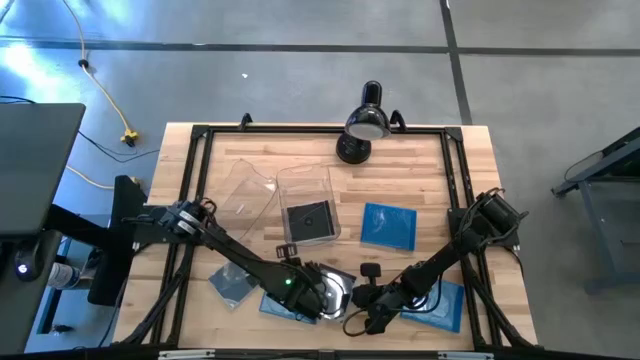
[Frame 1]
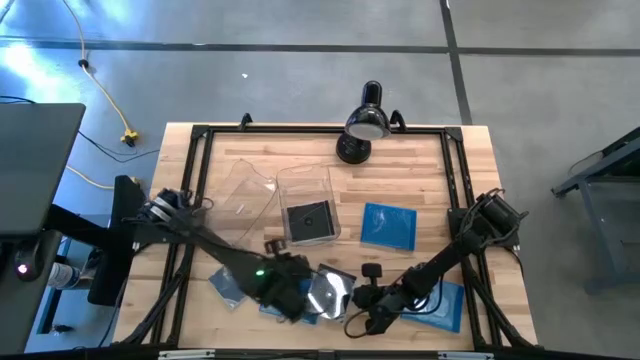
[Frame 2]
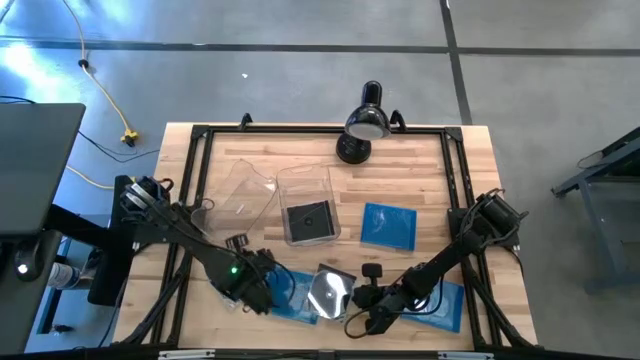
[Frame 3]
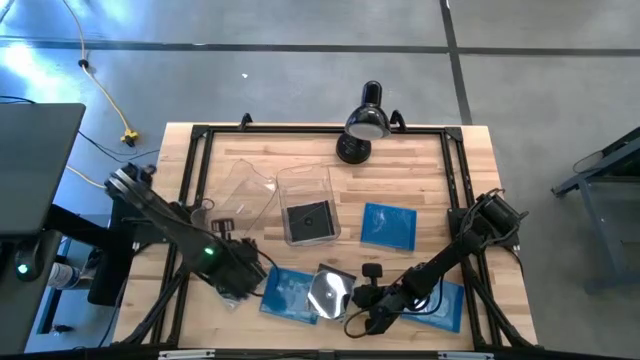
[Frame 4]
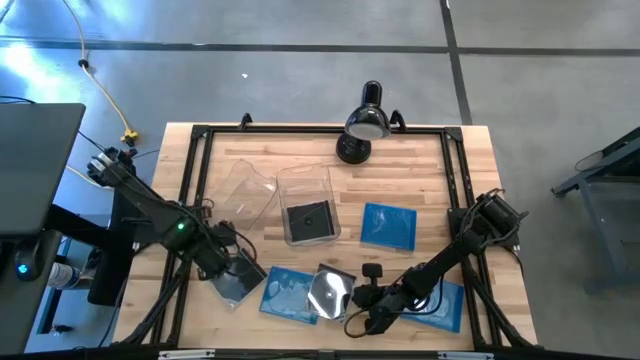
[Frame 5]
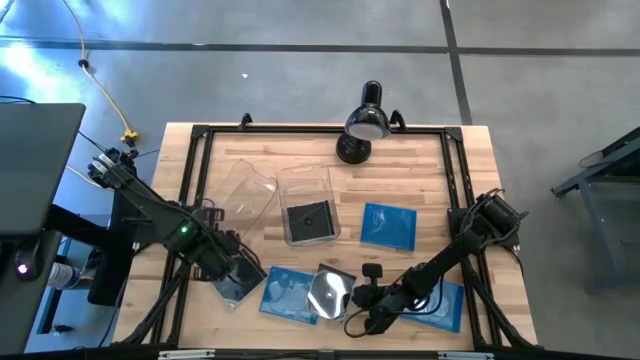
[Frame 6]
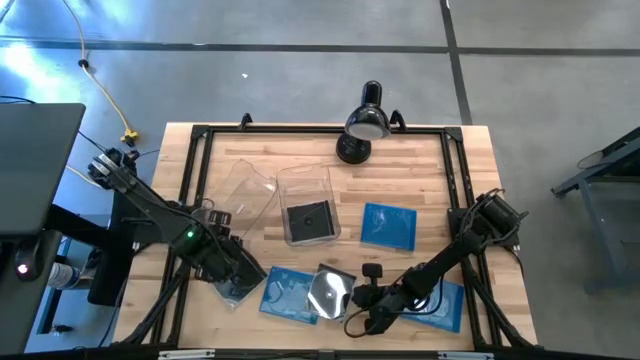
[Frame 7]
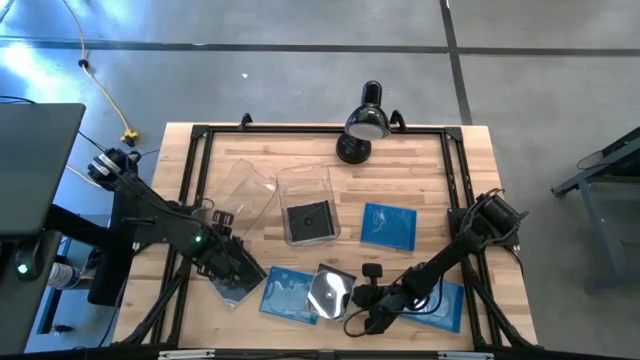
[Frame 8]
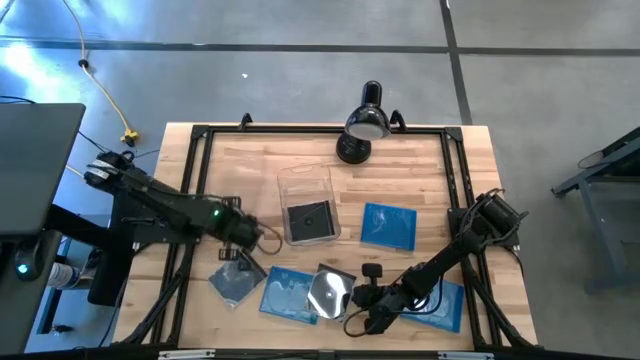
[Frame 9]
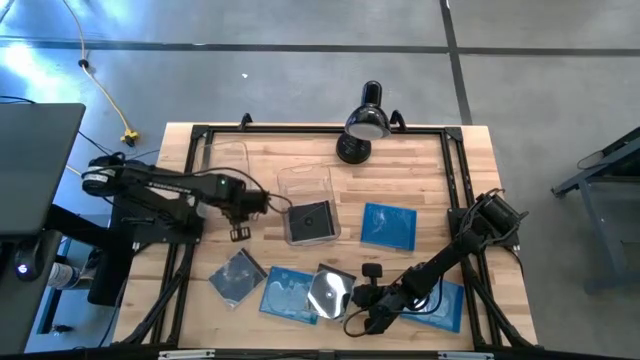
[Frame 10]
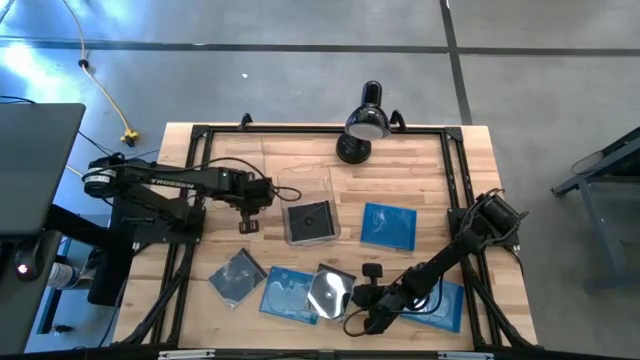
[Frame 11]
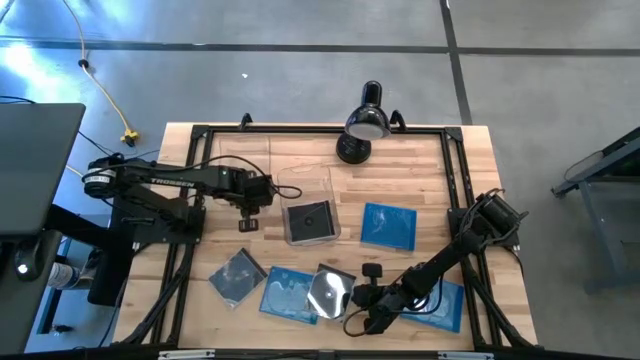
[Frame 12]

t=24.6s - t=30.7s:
Task: Pick & place jewel cases by type
Adjust the left transparent bin

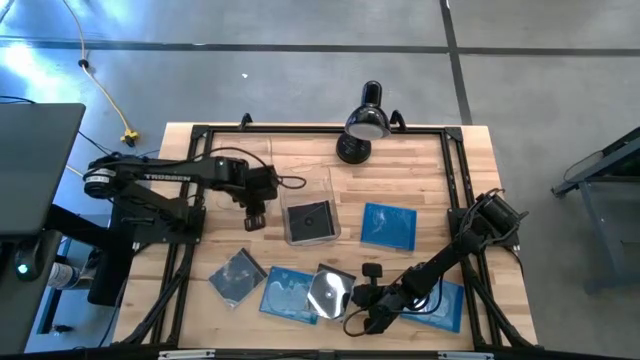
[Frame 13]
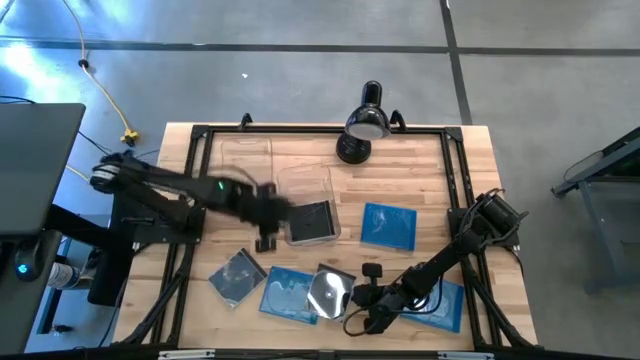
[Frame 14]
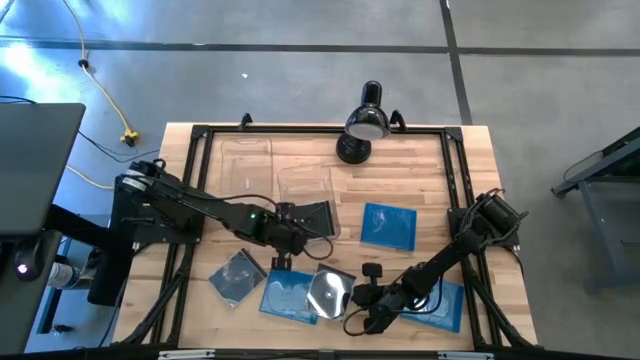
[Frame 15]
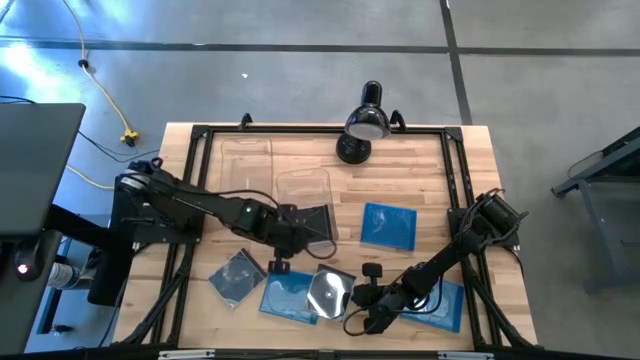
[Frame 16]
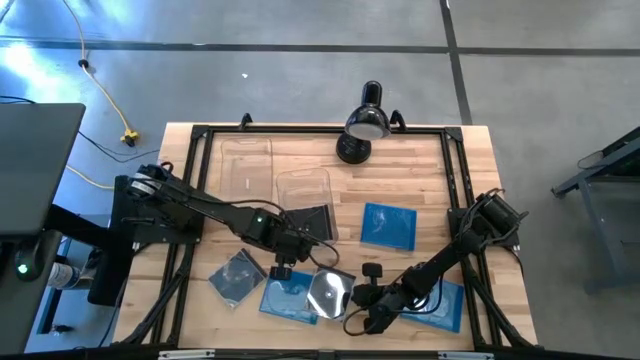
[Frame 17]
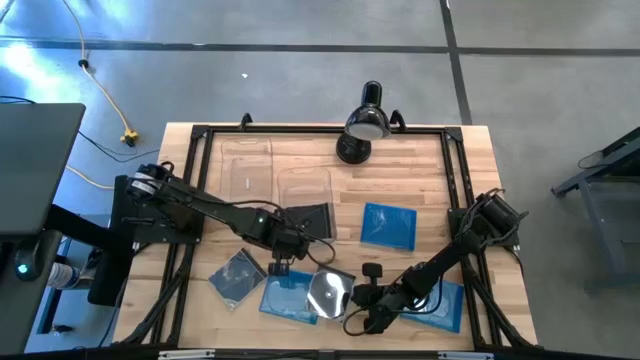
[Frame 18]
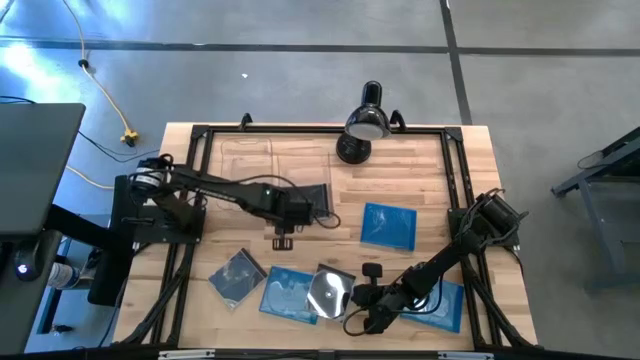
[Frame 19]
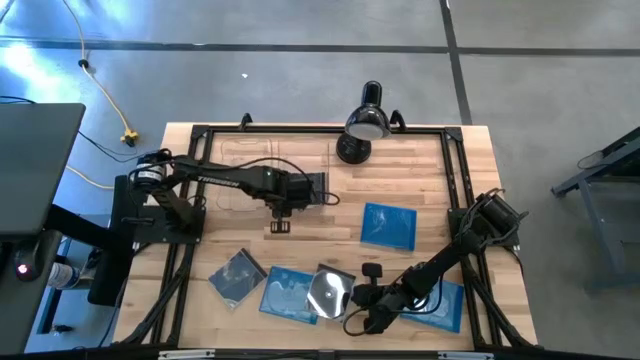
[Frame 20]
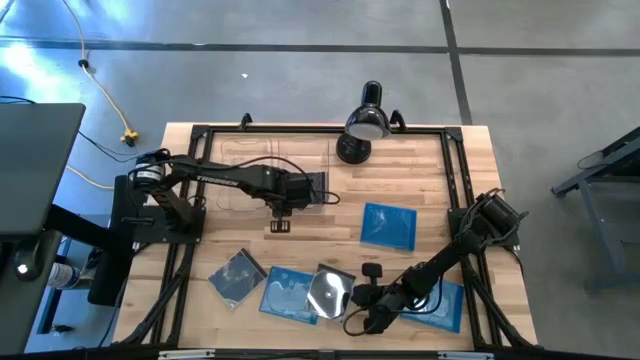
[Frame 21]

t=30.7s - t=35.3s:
Adjust the right transparent bin

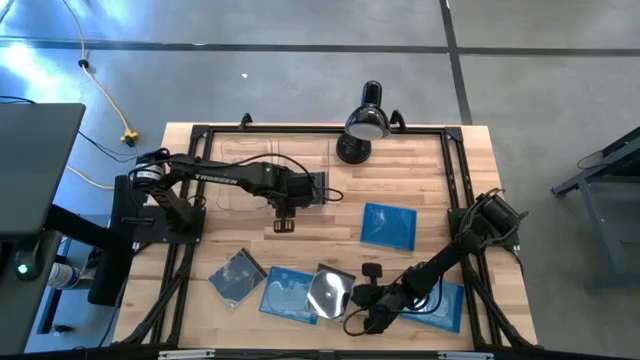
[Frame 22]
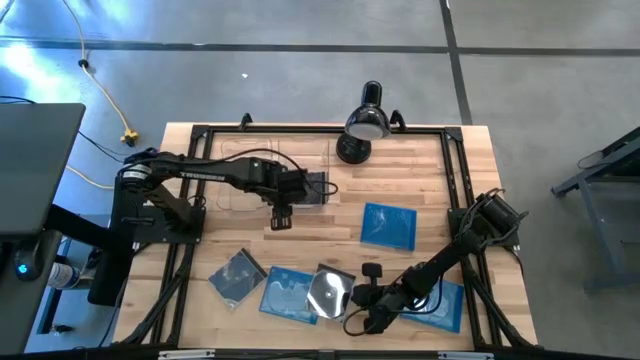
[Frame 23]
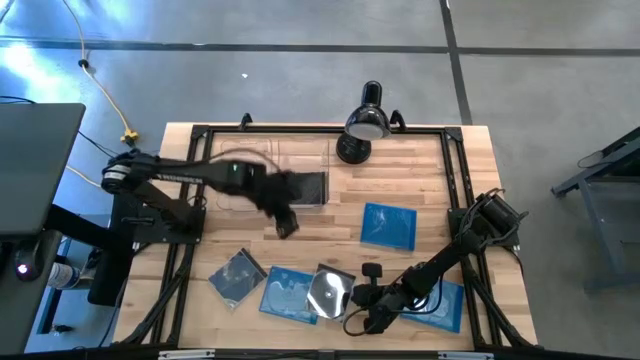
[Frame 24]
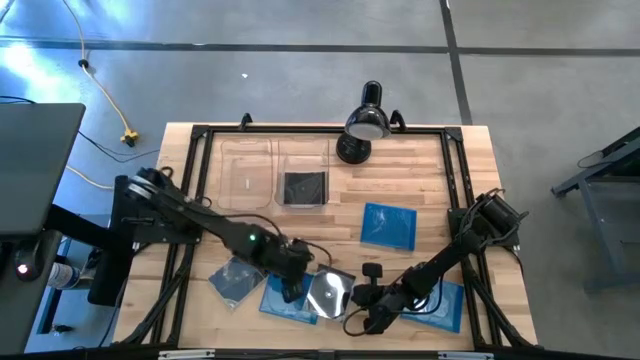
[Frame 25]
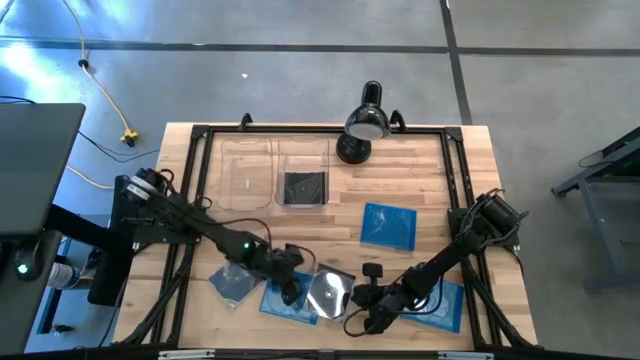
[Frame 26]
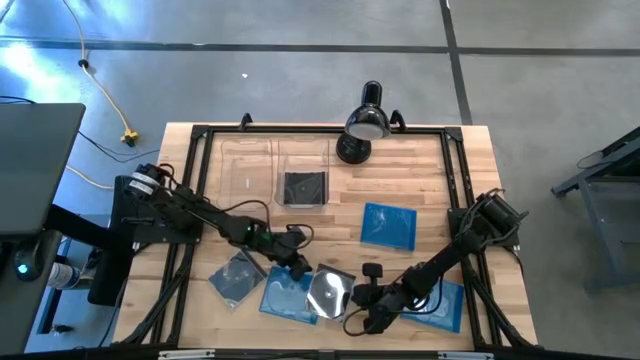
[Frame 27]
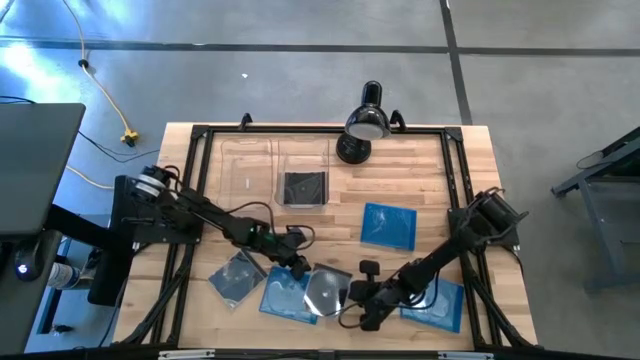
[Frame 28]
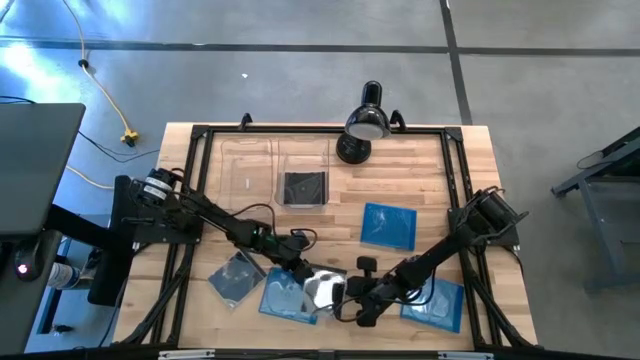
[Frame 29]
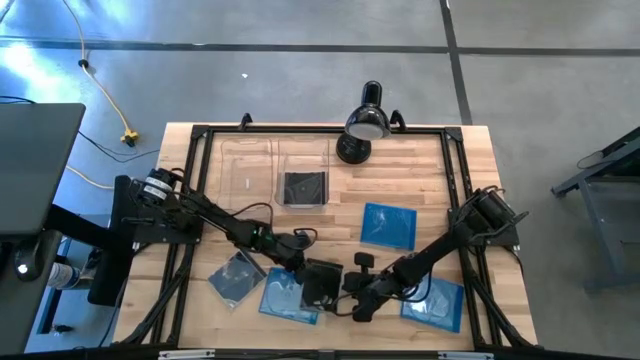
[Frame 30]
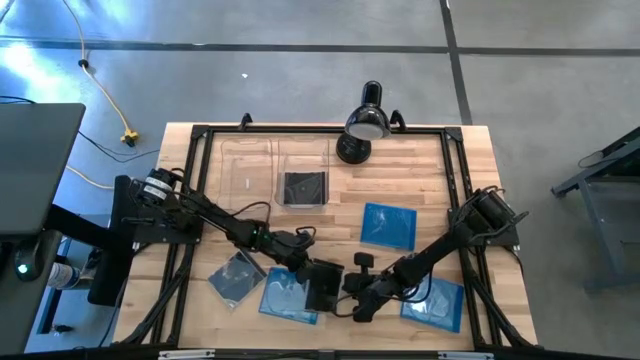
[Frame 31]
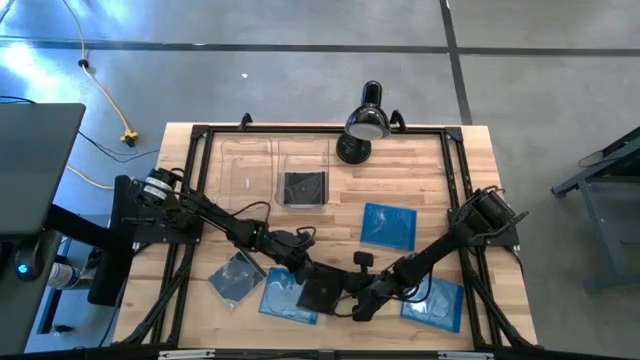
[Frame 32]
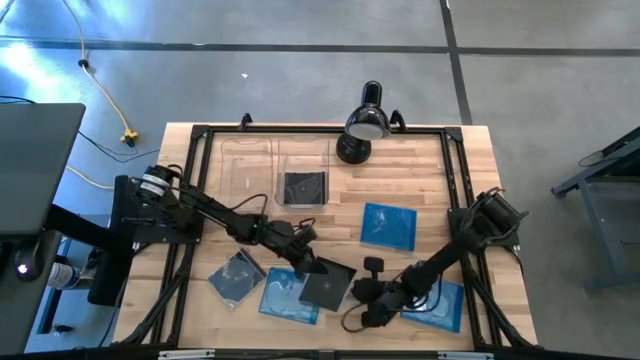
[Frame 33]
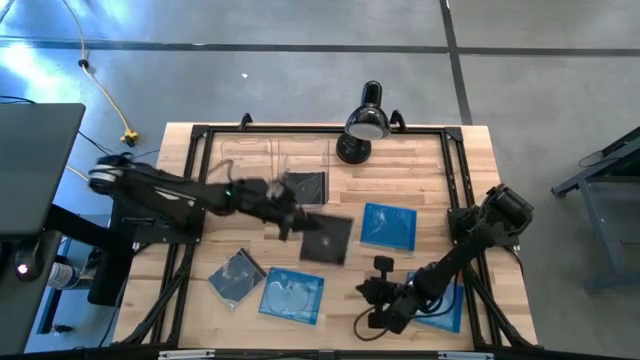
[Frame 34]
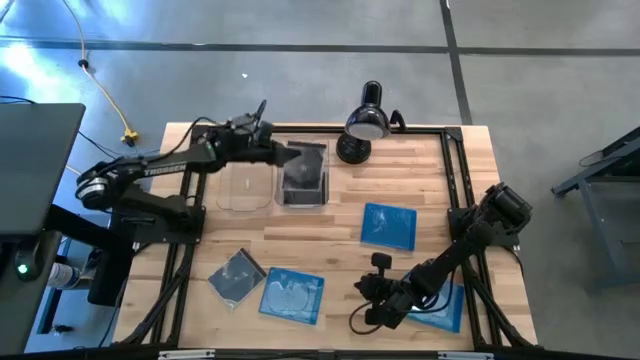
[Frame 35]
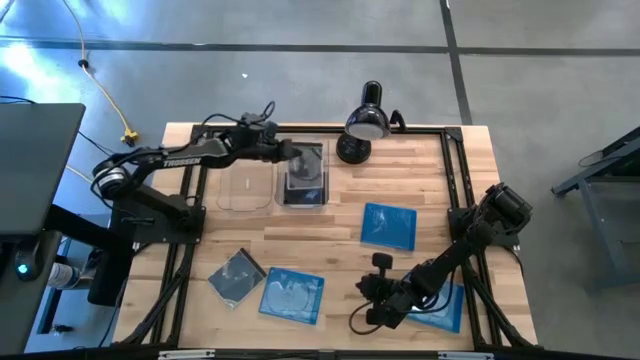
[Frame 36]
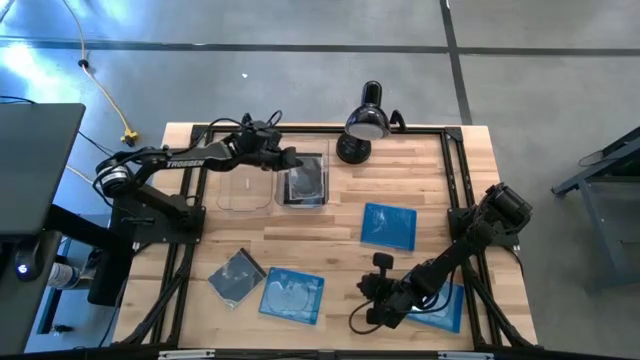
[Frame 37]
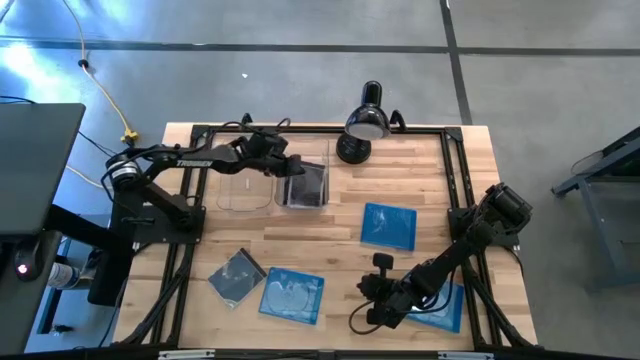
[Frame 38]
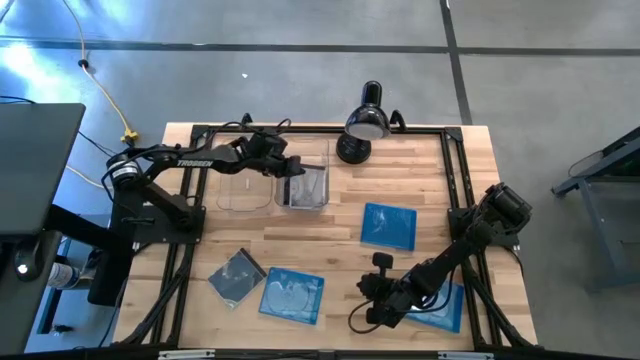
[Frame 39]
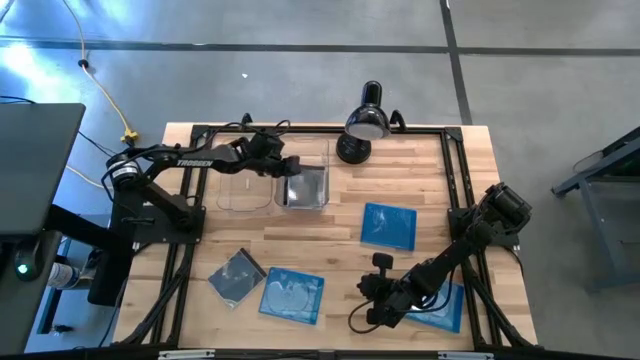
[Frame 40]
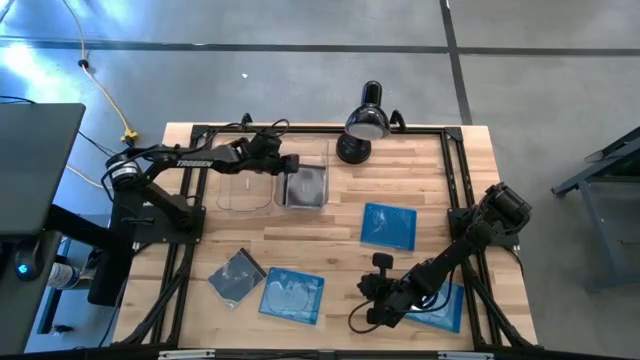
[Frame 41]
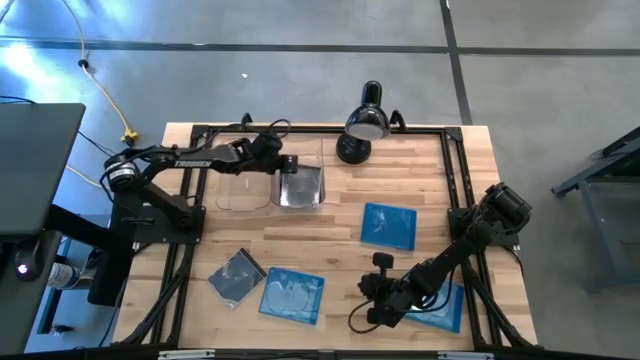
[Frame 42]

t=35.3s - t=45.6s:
Put the right black CD case into the right transparent bin
